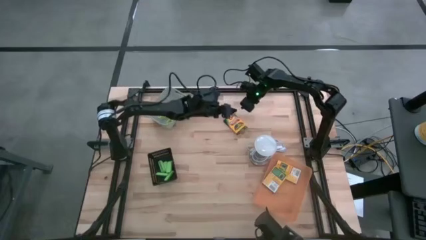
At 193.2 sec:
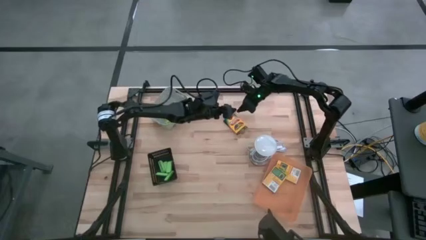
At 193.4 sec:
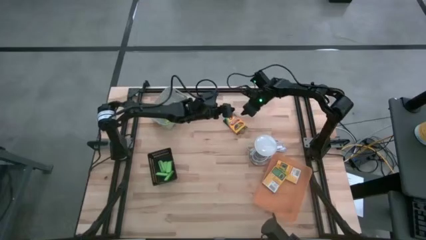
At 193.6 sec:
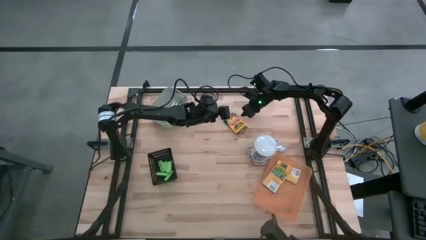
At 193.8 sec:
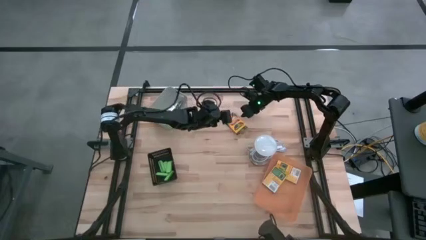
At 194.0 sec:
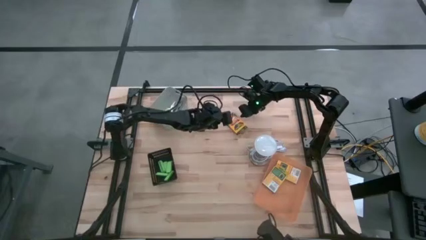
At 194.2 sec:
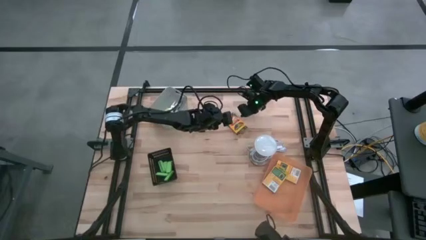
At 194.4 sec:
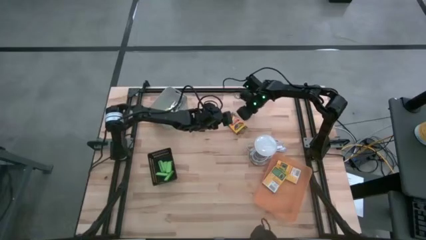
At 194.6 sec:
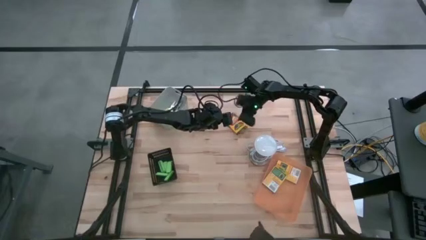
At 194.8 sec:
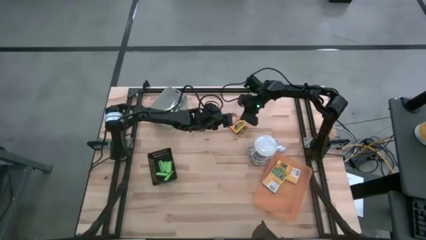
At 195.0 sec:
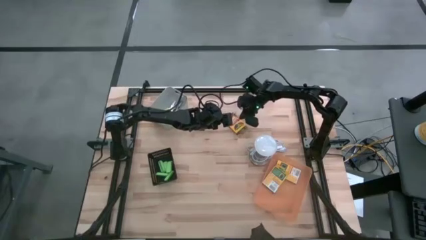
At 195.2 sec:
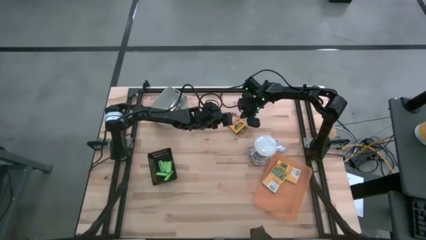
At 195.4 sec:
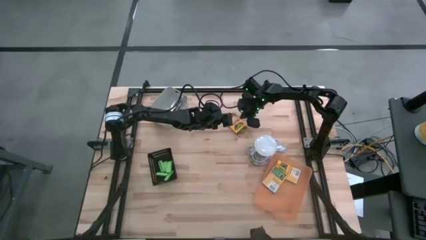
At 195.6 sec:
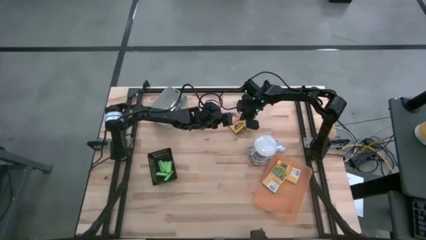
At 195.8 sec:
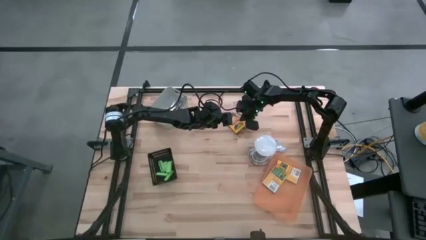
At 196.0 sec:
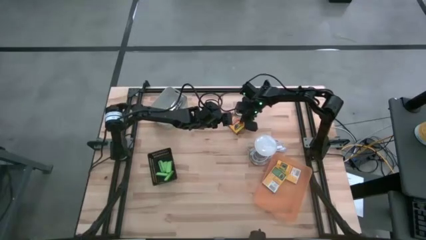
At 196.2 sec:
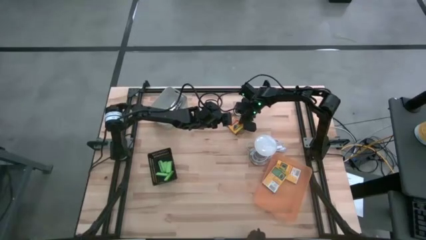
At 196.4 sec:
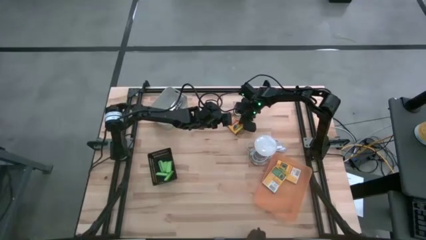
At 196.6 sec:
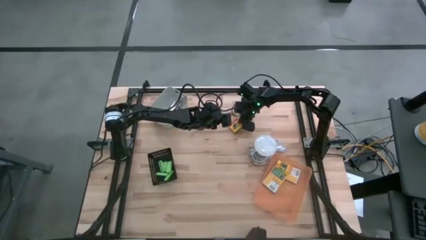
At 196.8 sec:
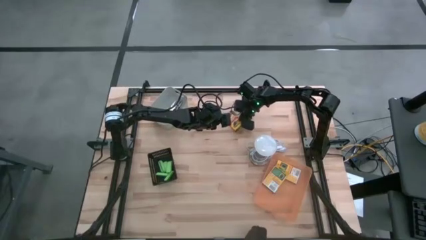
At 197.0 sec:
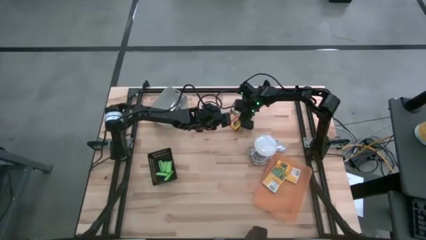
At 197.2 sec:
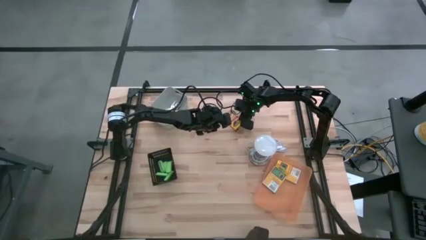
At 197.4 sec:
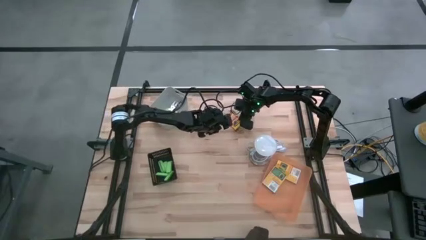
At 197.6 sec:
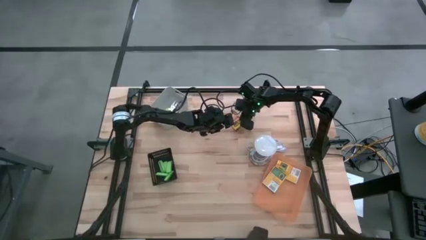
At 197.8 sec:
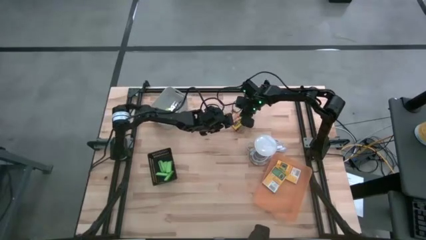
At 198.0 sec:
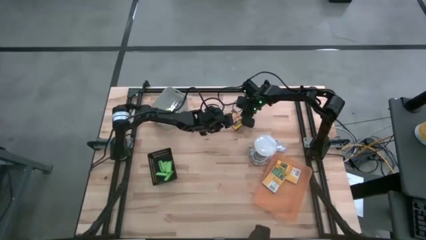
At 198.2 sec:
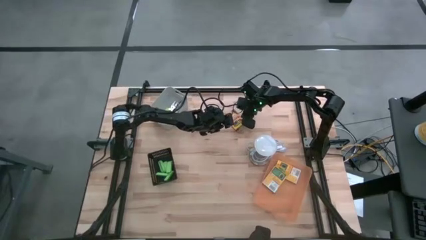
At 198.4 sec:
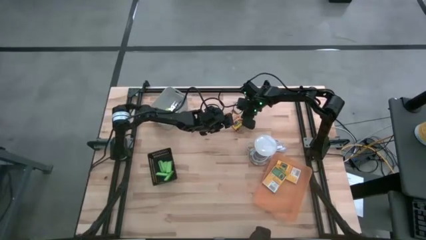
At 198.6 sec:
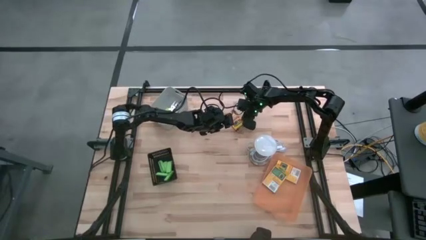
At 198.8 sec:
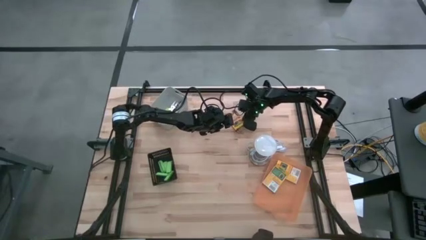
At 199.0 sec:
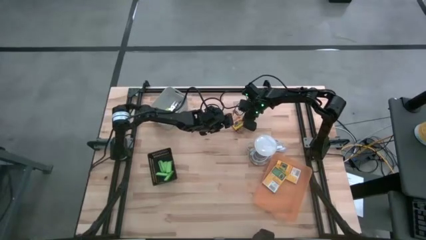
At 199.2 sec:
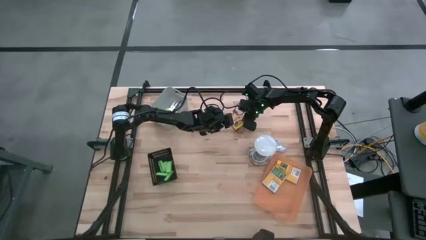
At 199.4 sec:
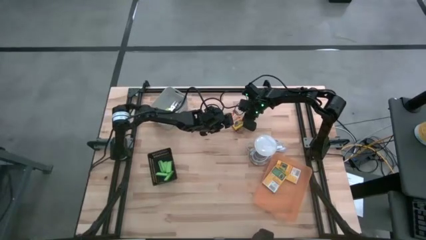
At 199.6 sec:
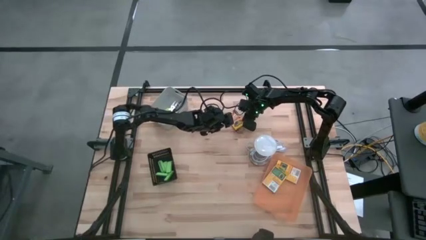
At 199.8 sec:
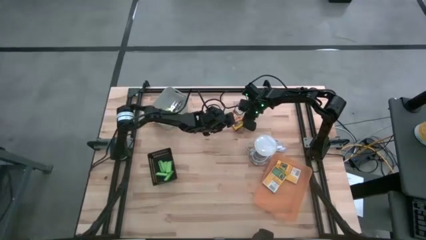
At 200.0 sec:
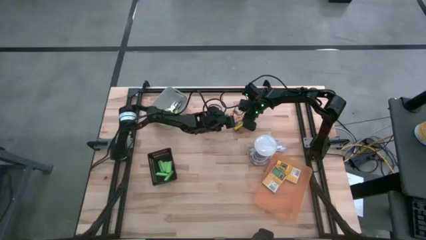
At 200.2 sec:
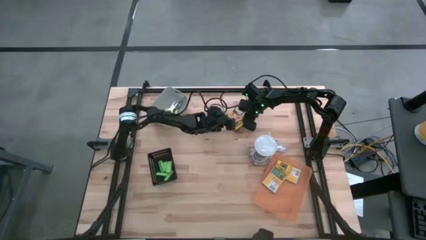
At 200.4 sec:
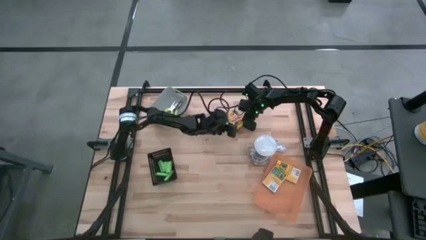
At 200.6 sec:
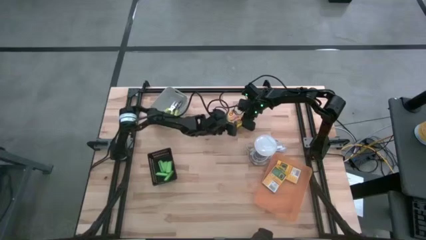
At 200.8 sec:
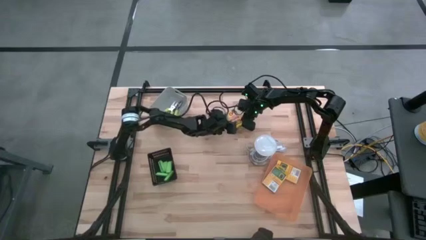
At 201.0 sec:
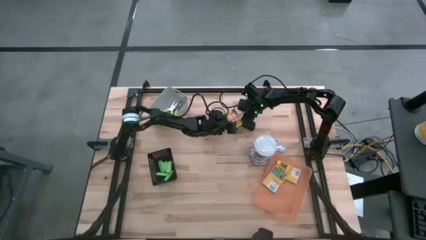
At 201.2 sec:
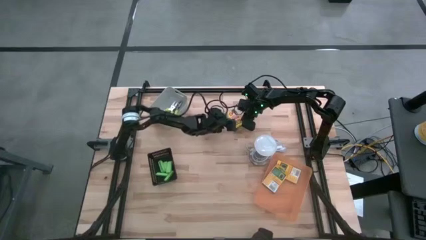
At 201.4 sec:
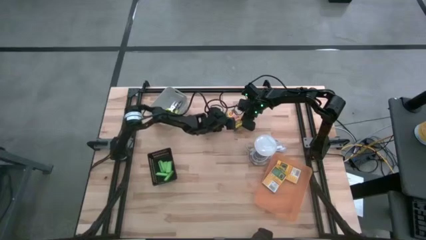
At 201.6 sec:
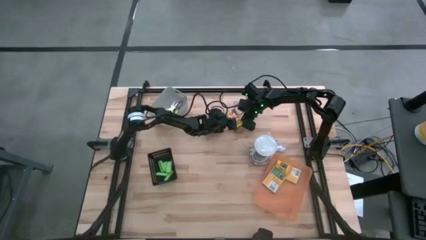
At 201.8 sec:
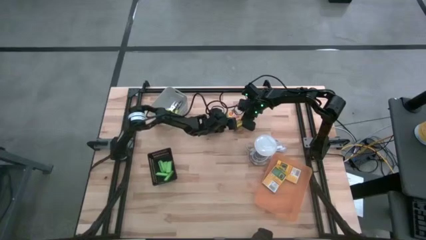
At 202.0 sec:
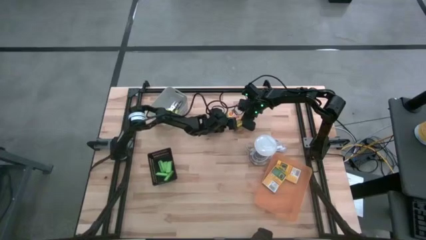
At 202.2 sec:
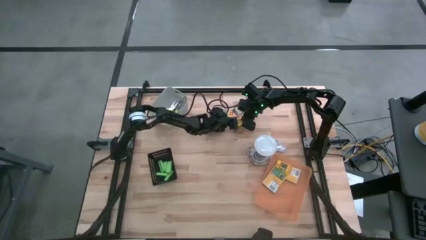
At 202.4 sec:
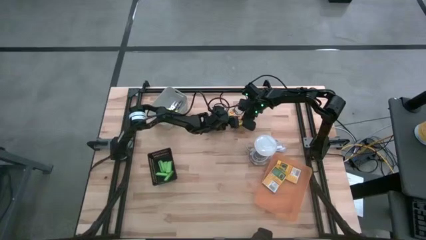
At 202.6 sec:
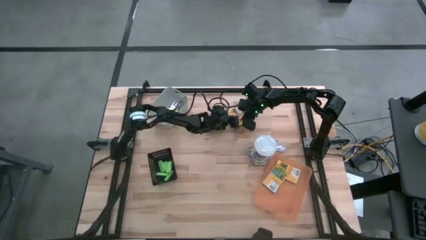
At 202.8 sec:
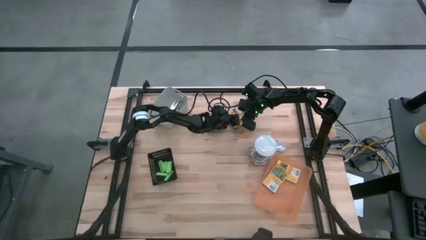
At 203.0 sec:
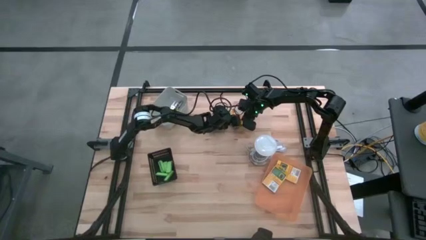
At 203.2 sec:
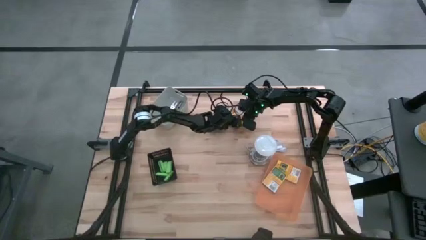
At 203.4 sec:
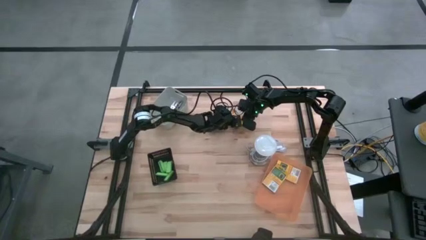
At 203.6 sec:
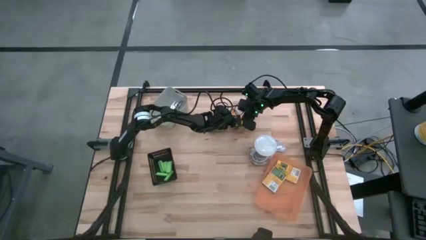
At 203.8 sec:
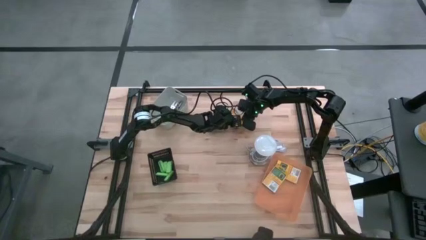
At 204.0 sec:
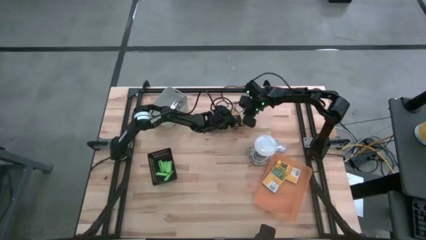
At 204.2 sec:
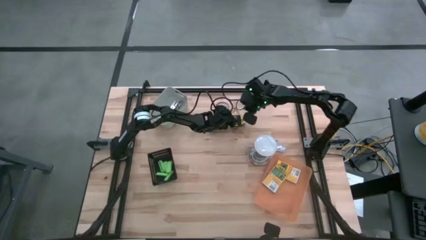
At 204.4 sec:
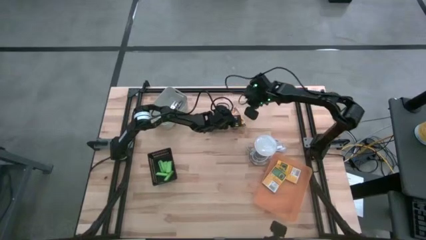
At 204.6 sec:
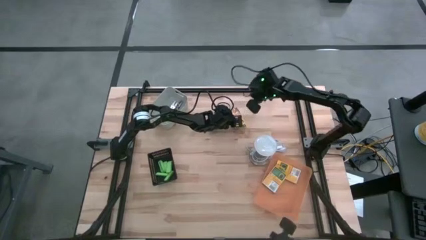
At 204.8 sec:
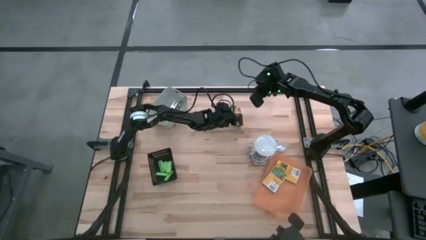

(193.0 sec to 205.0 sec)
Task: Pick & Place School Supplies
Put the yellow yellow crayon box into the orange bin

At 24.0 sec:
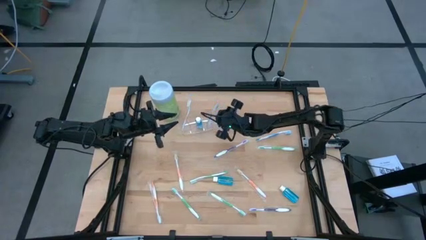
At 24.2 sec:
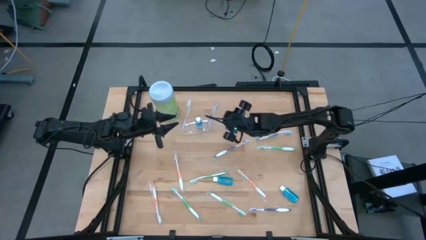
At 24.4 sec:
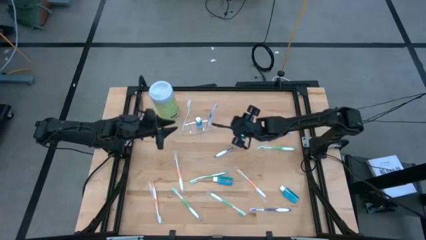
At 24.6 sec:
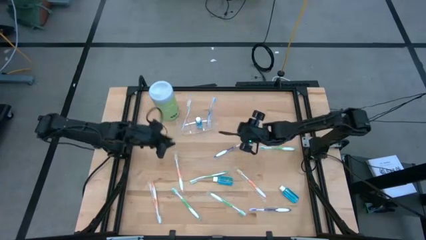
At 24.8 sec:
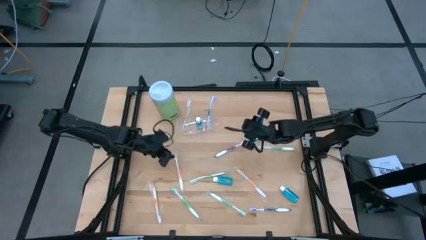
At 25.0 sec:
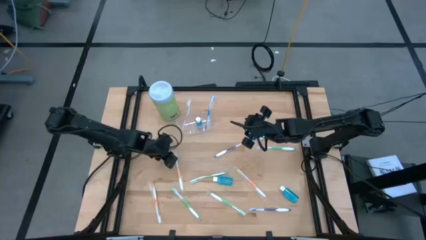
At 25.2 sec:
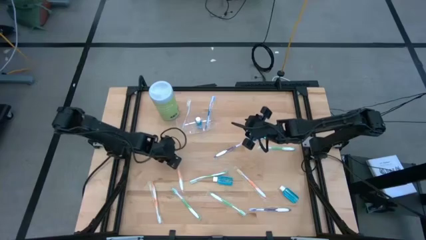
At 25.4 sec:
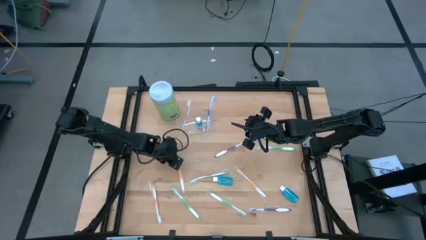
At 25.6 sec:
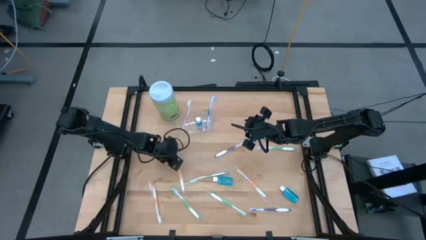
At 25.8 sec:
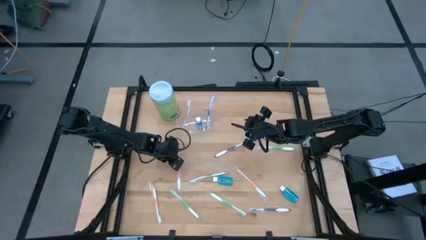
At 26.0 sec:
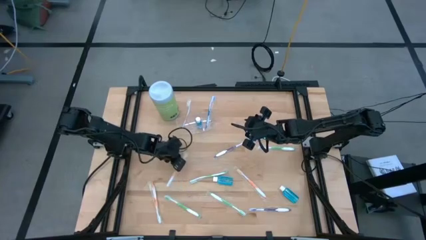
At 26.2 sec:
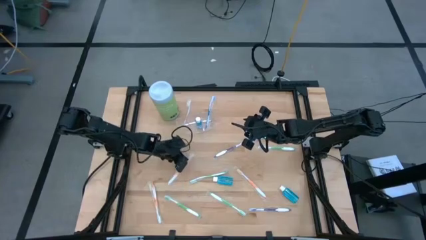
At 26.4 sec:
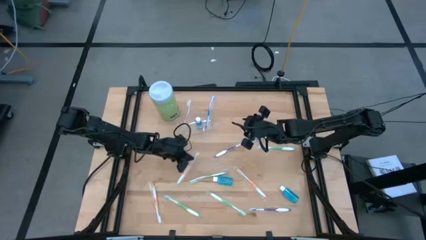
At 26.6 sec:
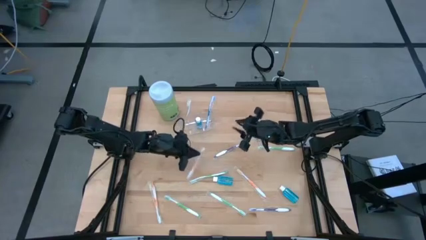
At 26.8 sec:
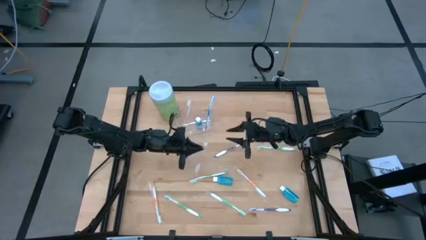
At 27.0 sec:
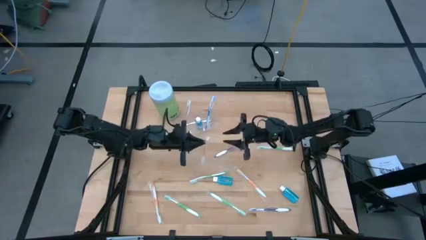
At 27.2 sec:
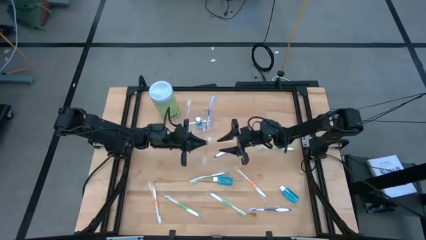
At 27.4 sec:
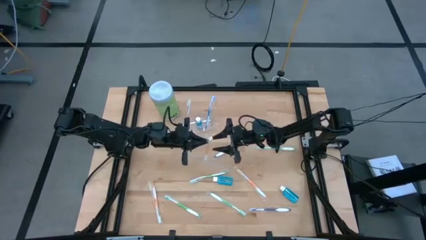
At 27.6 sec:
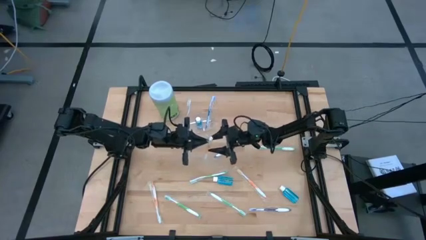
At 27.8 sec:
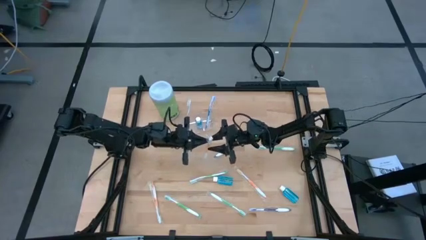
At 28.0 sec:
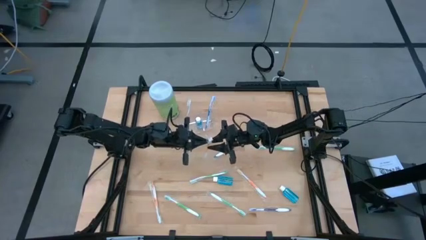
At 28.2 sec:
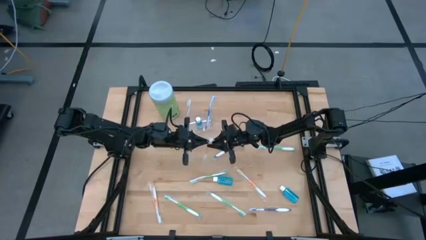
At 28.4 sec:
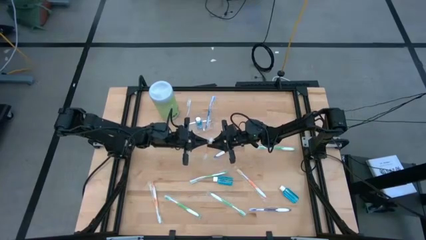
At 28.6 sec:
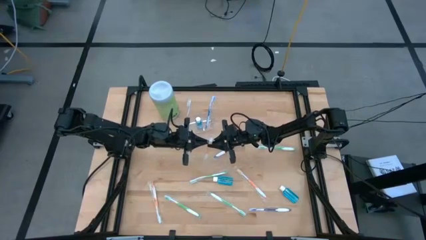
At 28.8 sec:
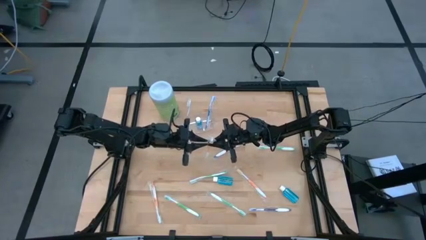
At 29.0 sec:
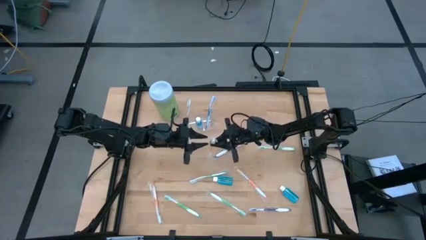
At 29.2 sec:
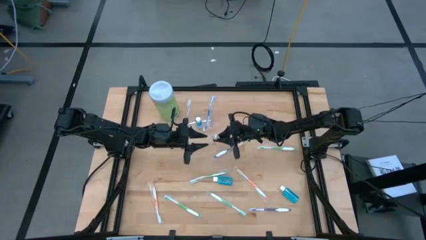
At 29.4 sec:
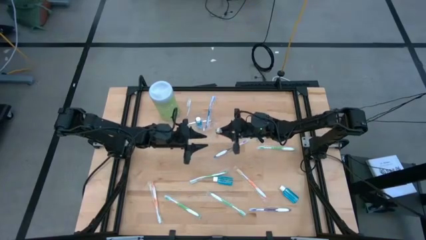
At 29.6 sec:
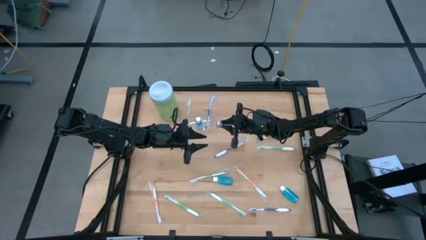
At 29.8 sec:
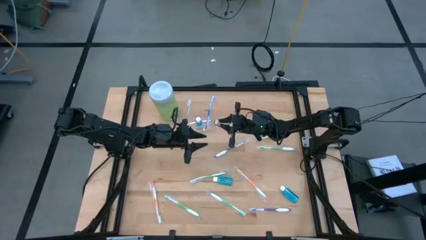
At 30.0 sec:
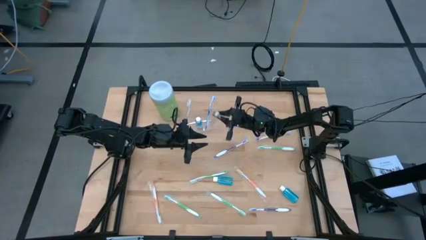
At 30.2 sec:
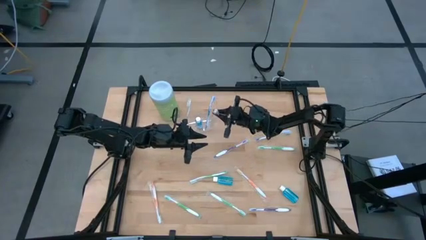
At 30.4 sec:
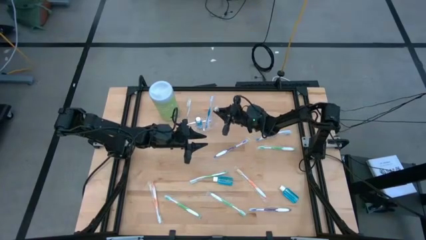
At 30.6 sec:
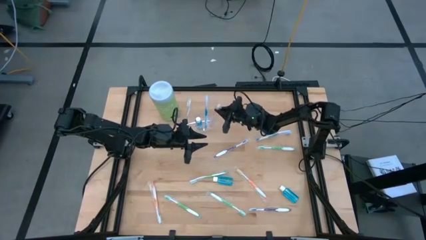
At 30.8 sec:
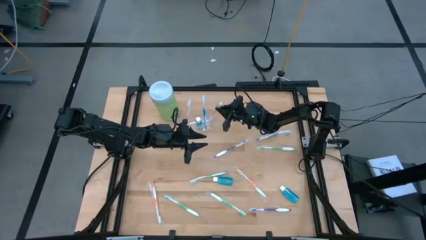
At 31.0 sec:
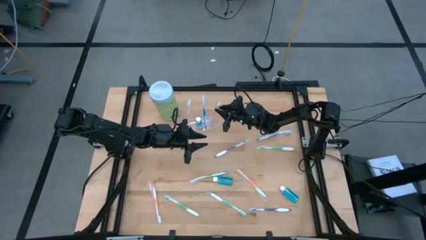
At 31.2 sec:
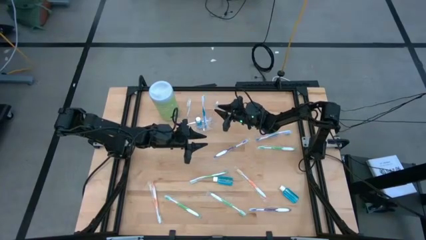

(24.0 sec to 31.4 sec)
Task: Pick & Place toothbrushing station
Put the orange toothbrush into the transparent organizer
